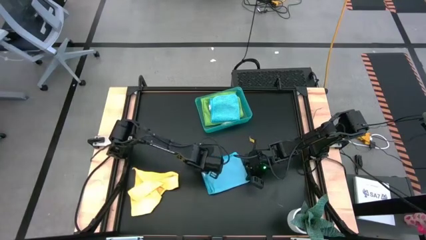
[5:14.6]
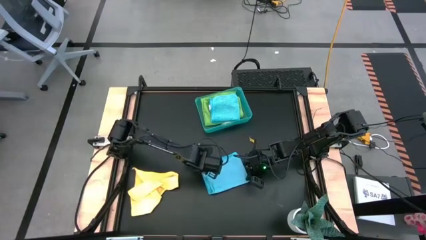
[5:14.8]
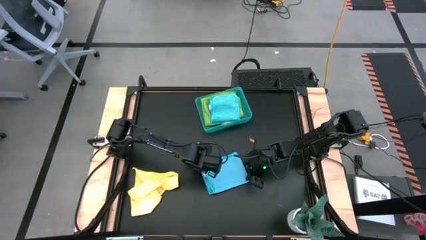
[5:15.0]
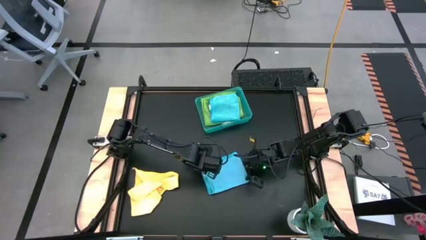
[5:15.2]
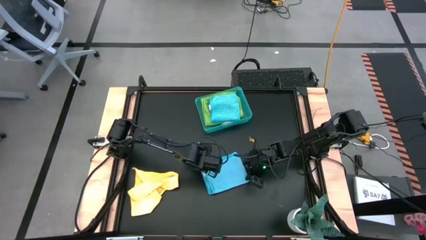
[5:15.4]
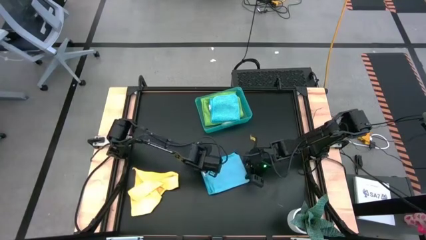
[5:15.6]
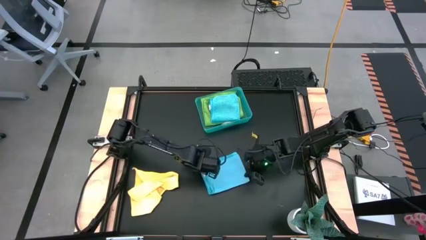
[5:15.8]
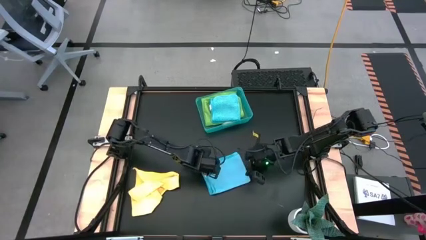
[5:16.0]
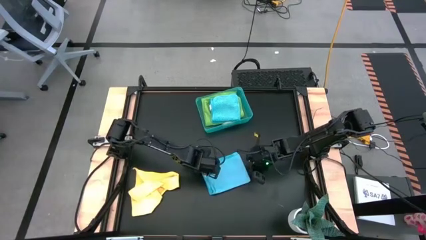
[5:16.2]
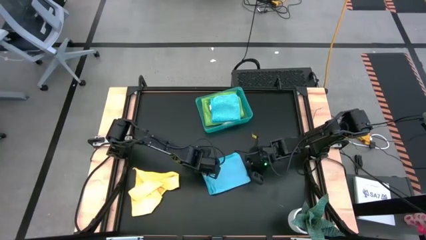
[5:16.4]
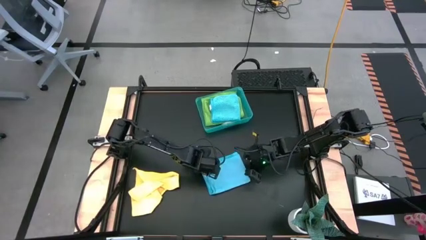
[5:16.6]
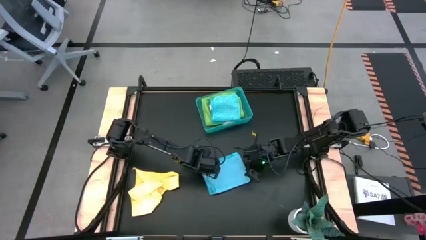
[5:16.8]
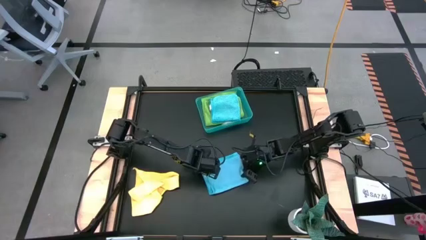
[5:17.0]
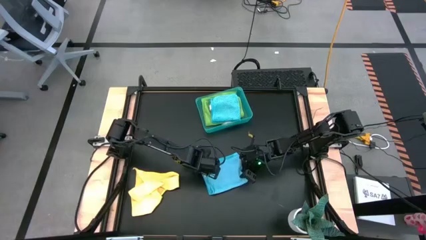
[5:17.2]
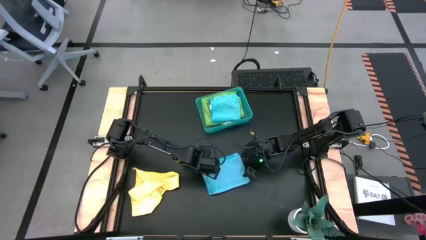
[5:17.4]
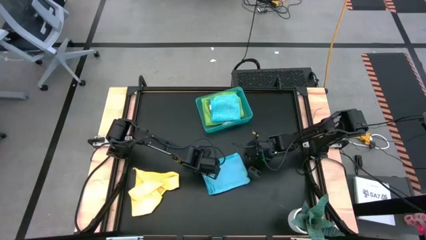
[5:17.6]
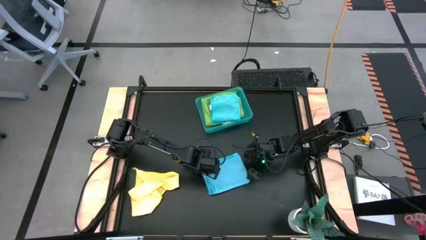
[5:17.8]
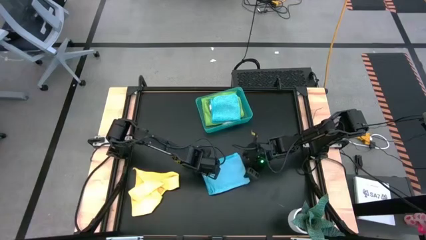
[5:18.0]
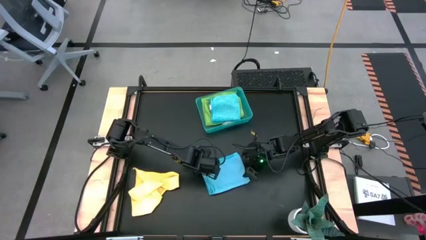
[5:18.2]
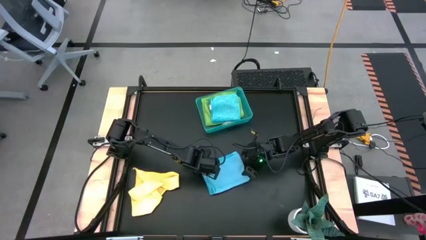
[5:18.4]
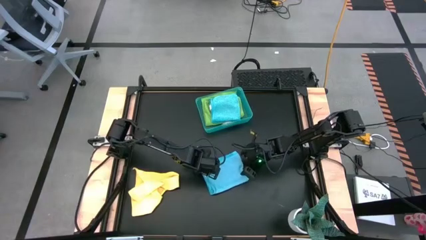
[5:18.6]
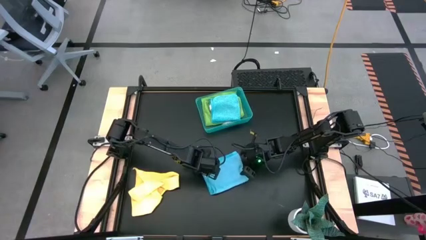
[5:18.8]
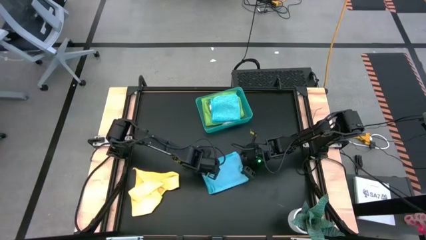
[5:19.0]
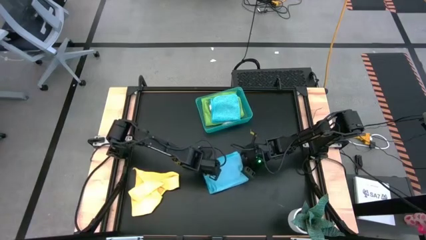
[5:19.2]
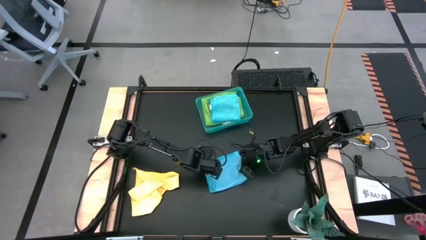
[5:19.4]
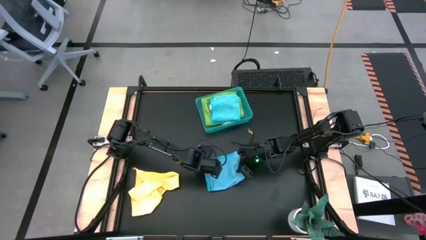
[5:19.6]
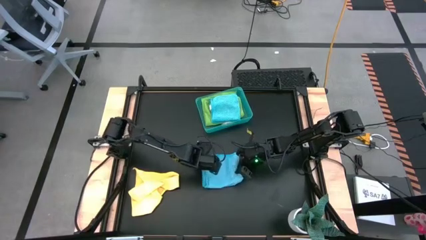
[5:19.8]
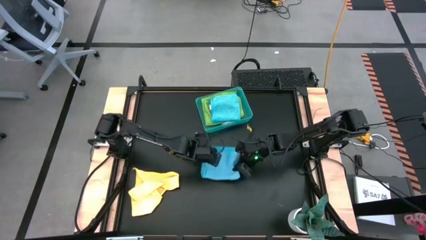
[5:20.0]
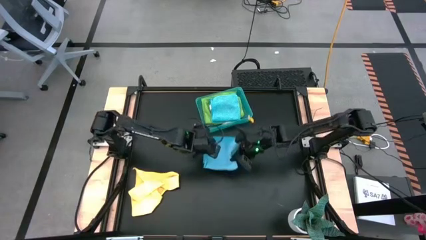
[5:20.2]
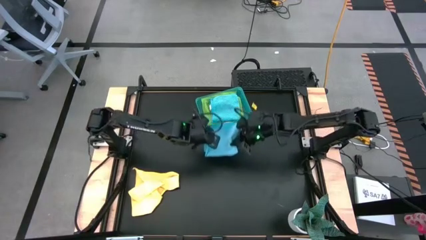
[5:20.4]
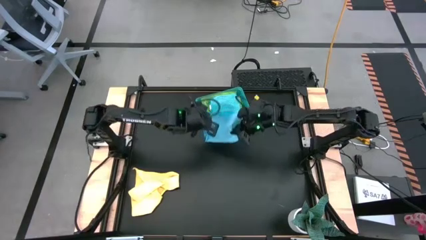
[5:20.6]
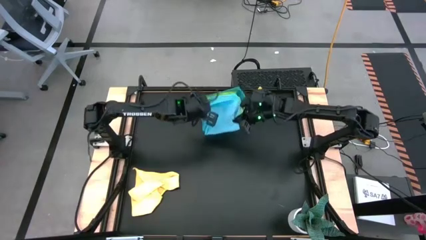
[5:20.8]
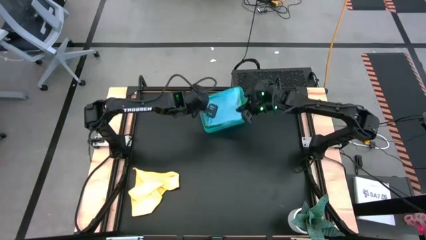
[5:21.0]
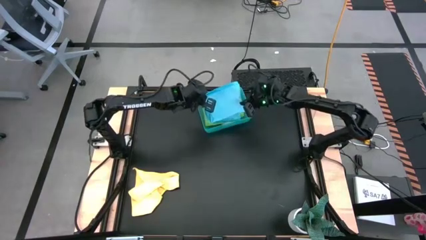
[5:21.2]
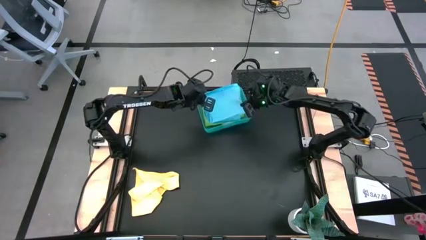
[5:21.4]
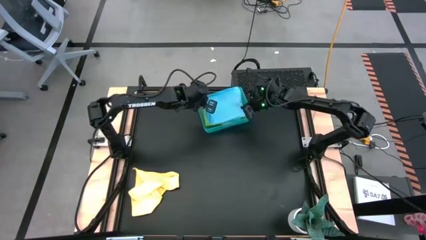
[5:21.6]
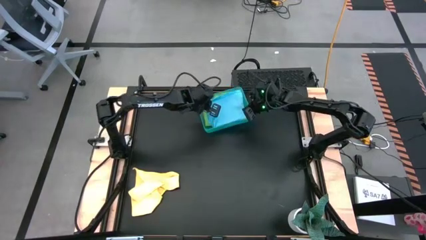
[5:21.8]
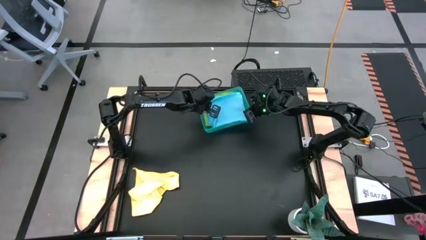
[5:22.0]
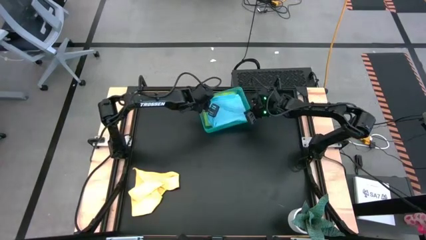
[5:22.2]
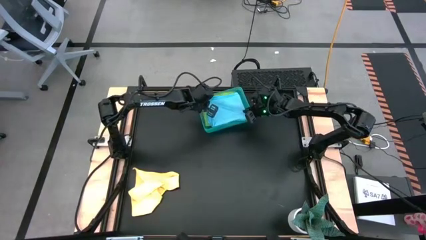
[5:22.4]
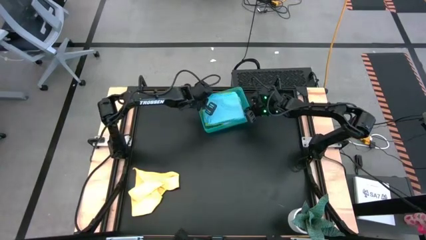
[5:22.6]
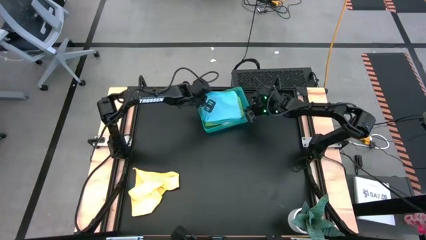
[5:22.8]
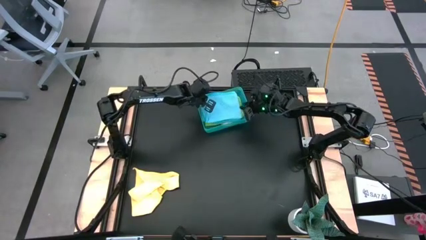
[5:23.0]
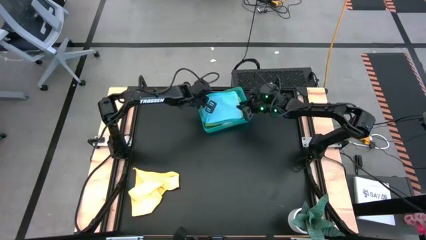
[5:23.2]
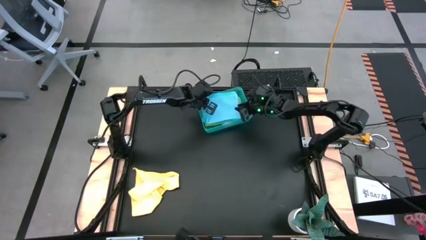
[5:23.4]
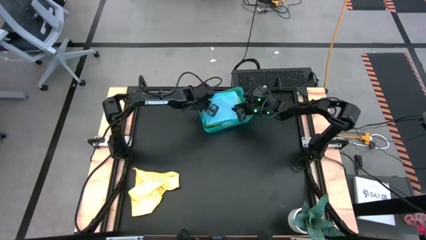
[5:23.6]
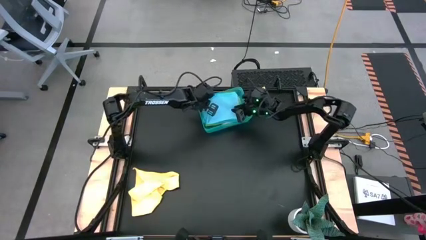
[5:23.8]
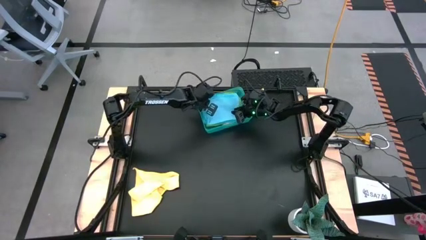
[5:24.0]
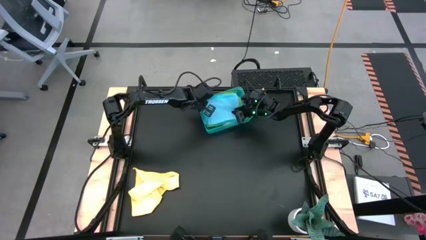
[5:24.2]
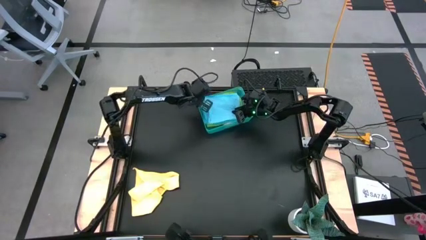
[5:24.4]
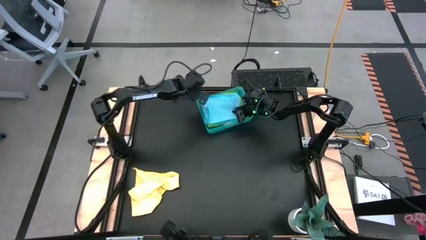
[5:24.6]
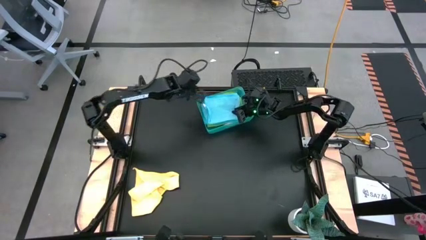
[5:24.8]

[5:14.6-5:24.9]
Task: Fold microfiber towels
Put the blue microfiber towel into the blue bin
